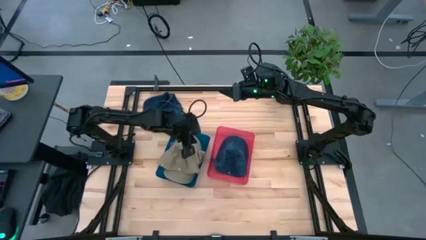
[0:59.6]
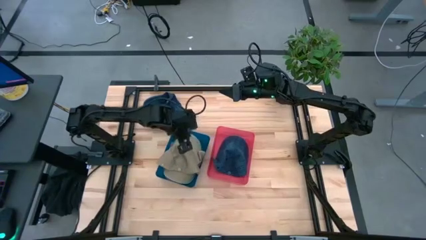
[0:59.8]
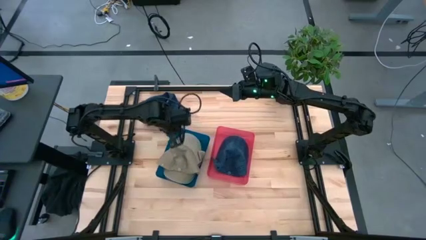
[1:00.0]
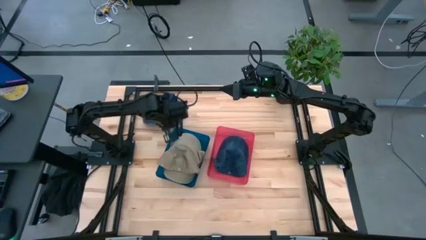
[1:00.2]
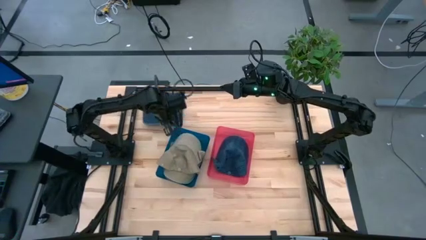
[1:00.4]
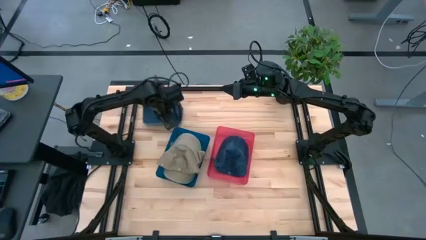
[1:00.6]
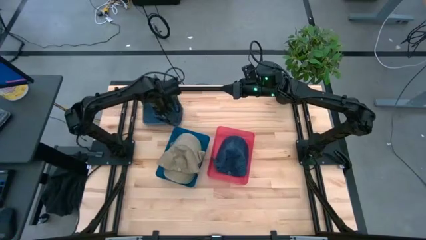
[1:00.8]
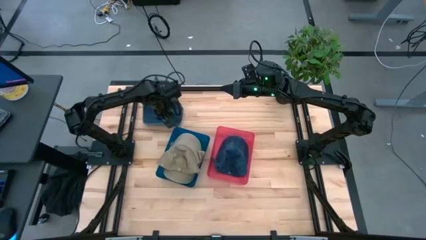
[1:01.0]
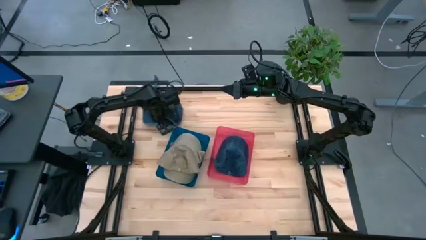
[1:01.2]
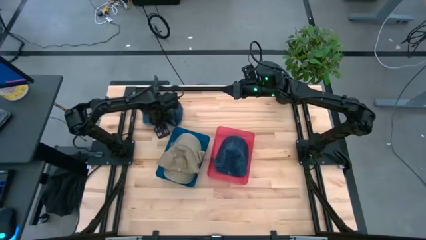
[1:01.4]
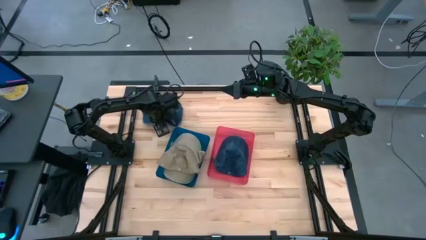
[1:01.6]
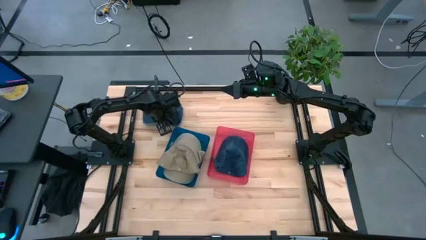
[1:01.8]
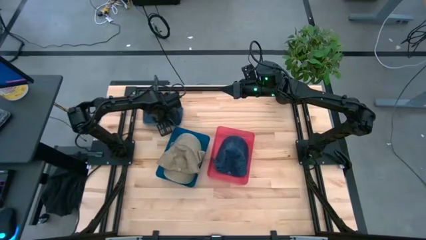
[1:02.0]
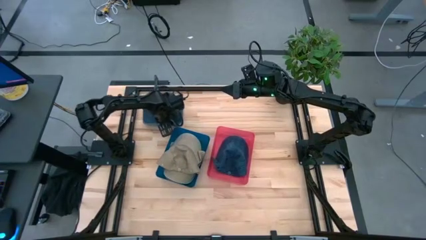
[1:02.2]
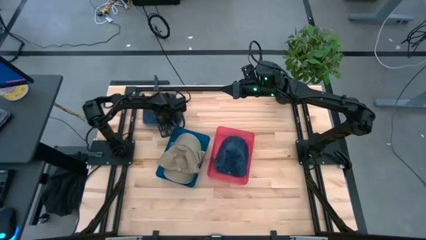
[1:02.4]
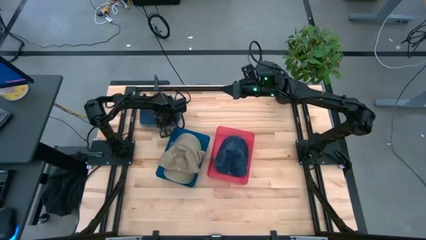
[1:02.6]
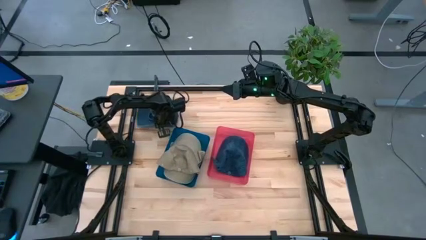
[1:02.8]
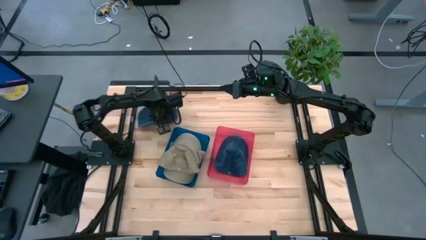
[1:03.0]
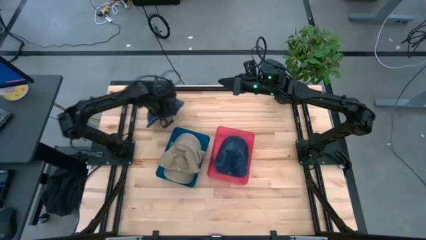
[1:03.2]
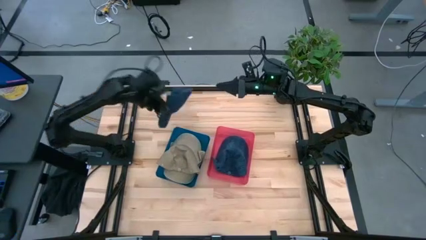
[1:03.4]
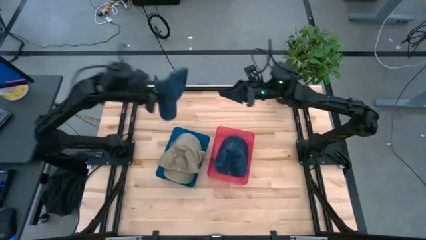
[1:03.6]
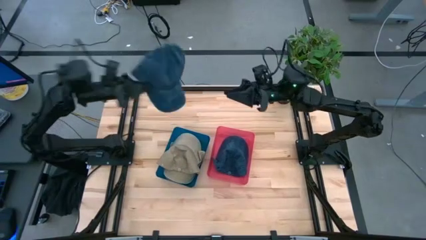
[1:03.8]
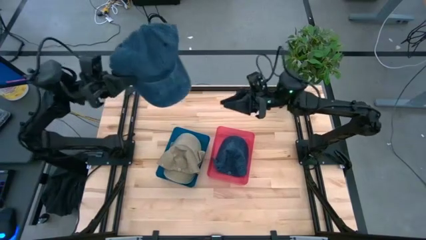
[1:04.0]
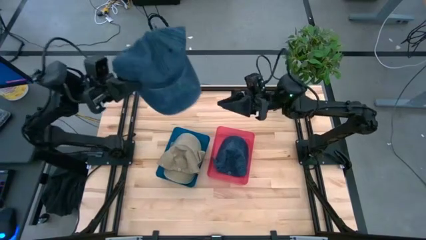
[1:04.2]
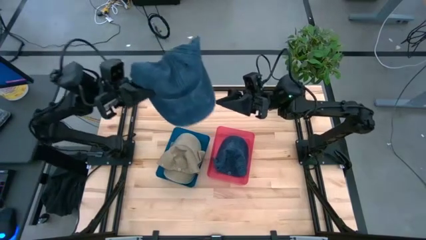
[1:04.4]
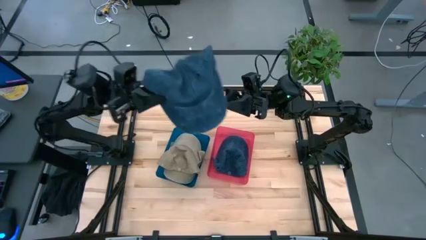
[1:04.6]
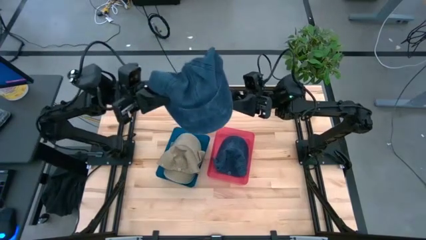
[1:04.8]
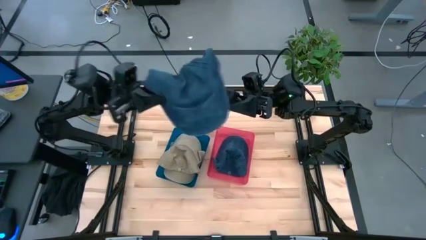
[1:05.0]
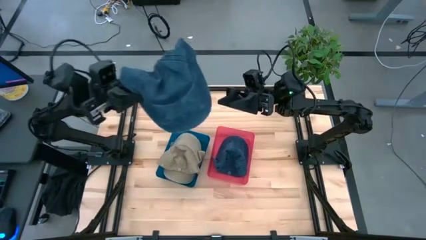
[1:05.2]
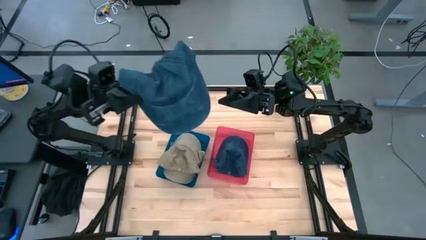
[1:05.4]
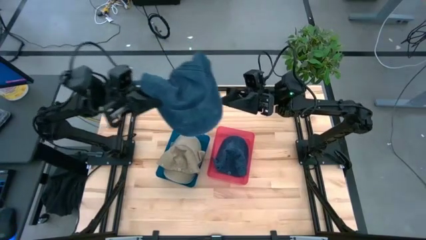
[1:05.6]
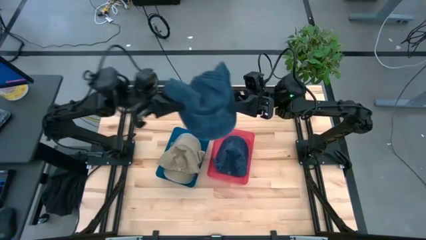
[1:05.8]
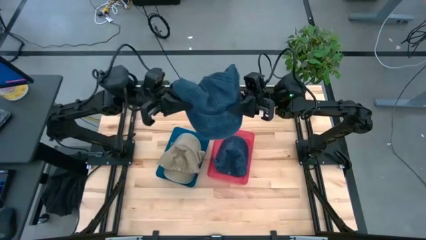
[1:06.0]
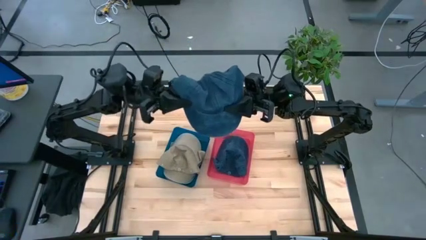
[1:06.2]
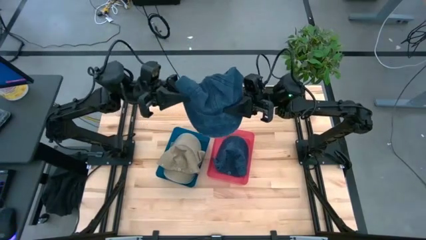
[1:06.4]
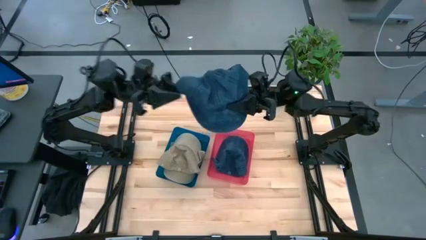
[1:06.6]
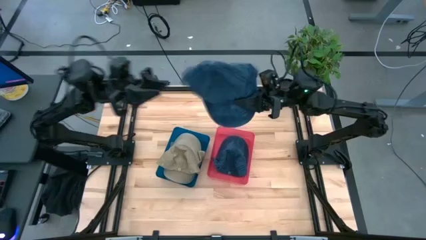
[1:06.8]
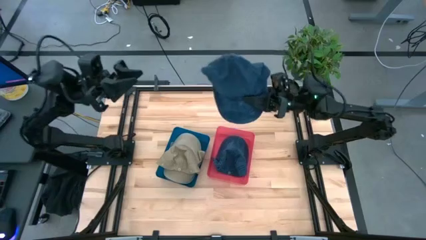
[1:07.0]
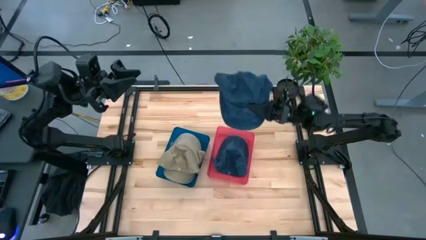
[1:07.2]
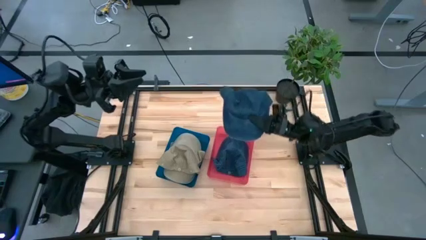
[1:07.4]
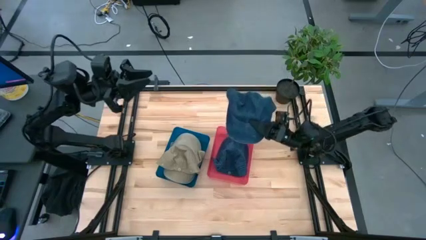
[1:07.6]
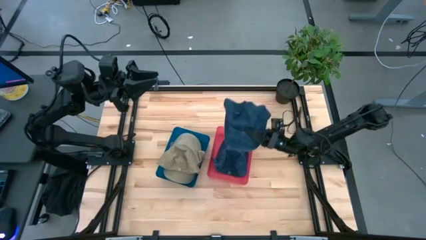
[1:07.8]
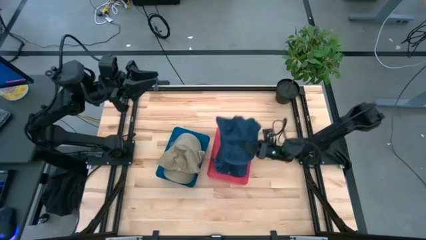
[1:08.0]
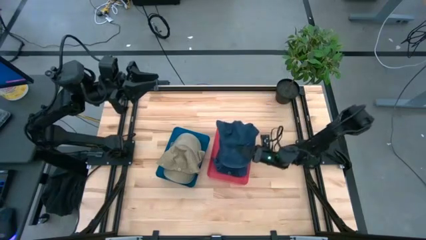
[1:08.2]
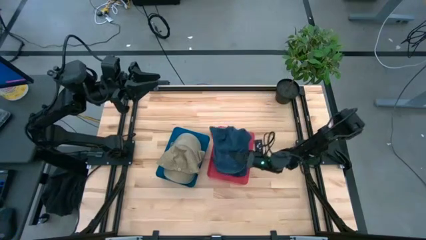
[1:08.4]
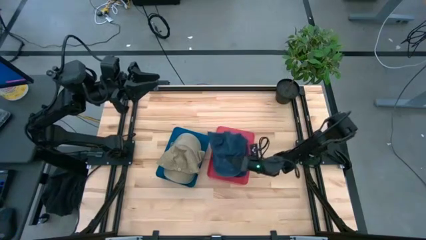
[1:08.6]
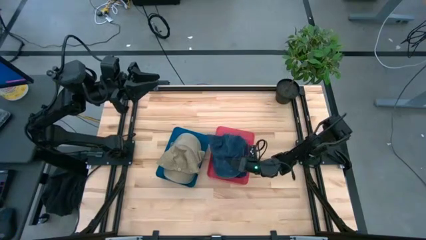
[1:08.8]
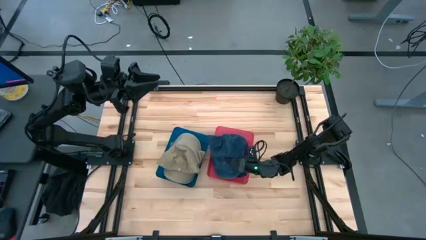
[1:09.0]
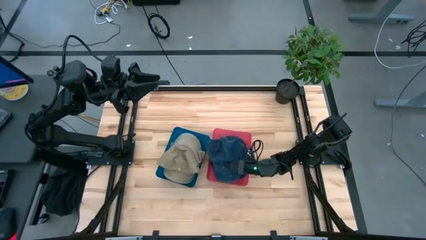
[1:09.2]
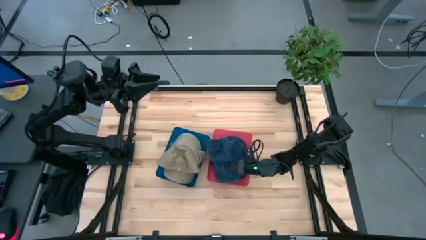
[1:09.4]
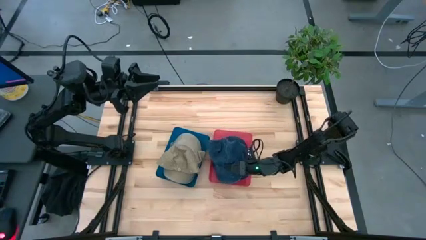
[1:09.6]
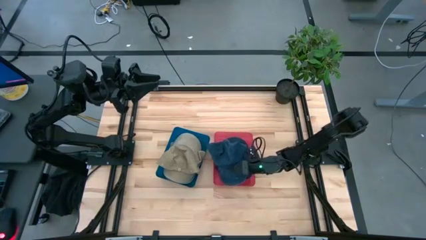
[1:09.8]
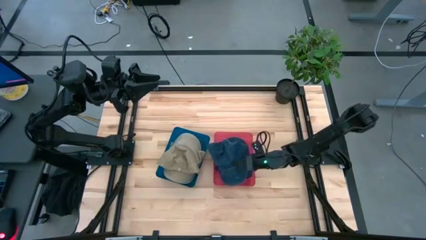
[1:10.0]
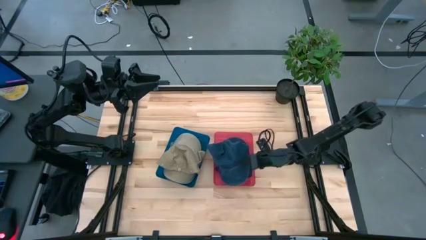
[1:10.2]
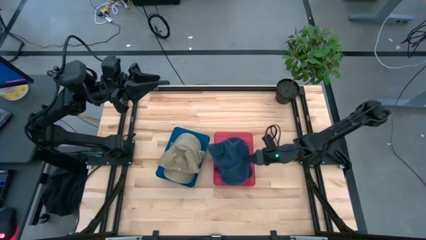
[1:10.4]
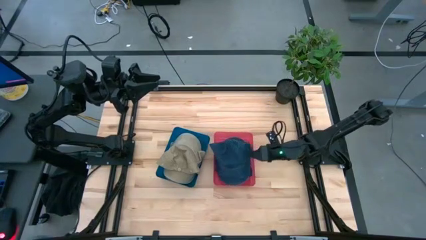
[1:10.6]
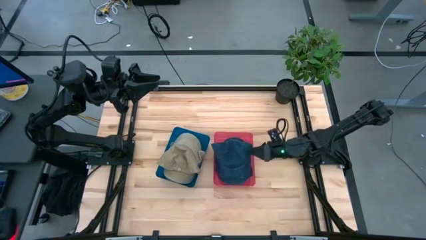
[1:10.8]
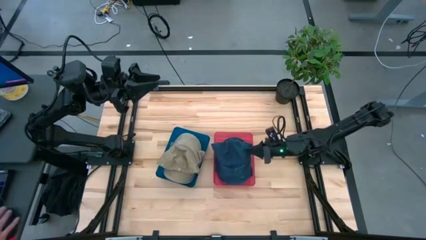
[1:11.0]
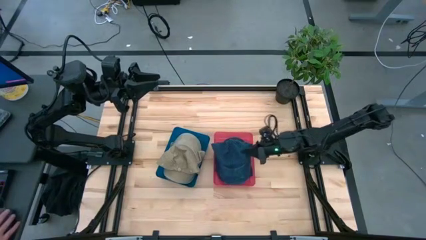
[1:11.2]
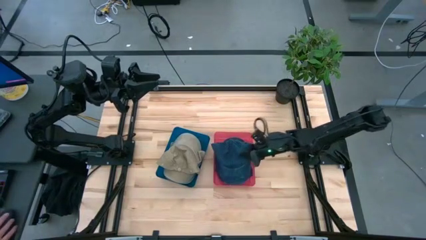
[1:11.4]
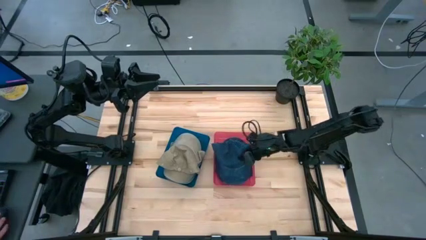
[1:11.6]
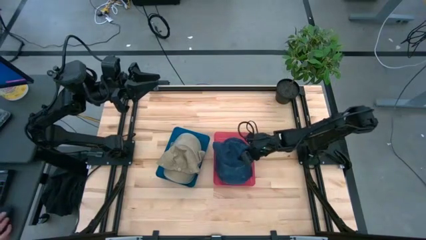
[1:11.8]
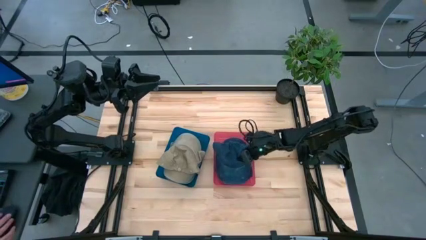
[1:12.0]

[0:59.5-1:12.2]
Task: Pick & Place hat
Put the blue cap into the red bin

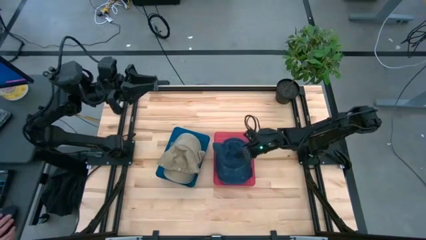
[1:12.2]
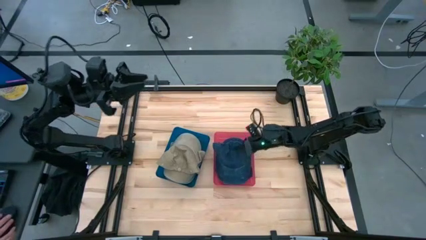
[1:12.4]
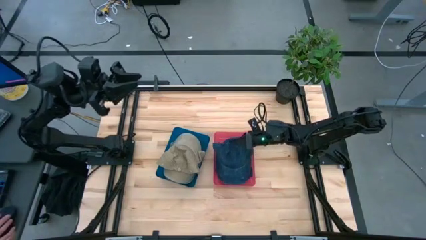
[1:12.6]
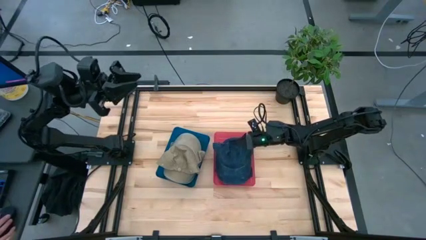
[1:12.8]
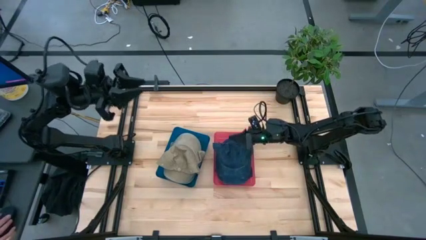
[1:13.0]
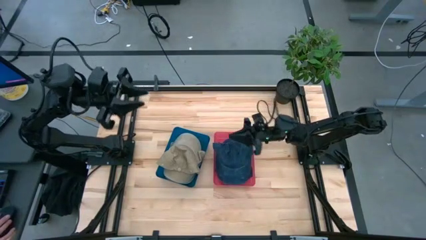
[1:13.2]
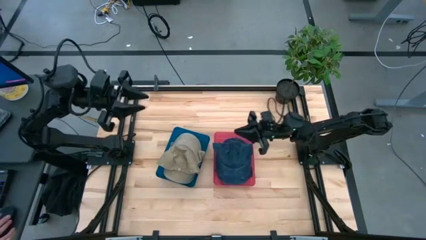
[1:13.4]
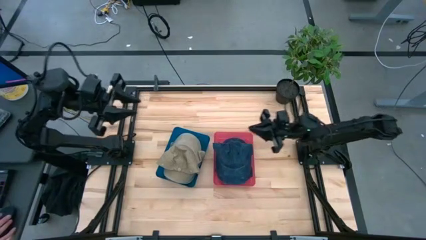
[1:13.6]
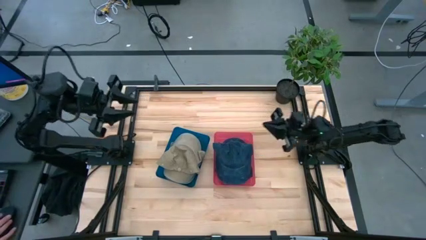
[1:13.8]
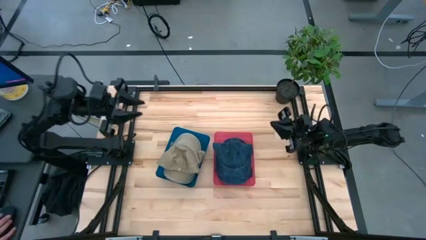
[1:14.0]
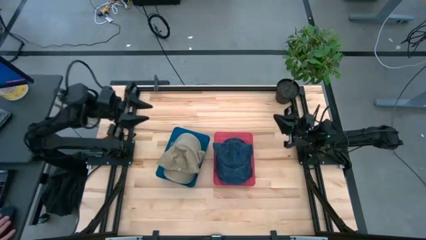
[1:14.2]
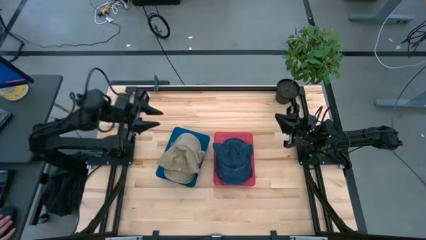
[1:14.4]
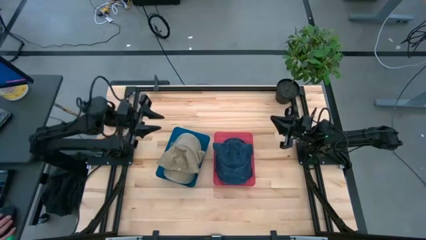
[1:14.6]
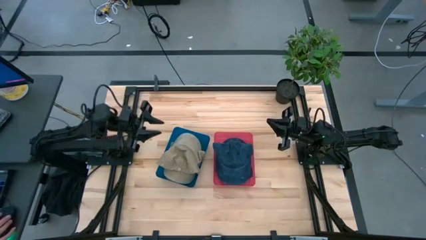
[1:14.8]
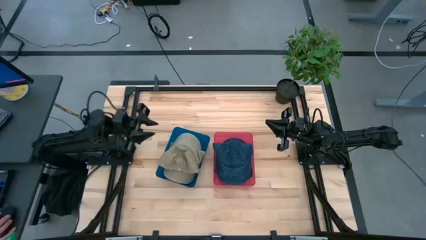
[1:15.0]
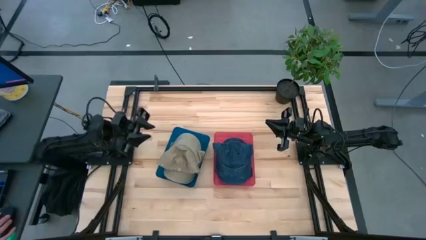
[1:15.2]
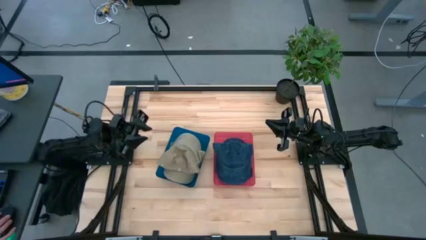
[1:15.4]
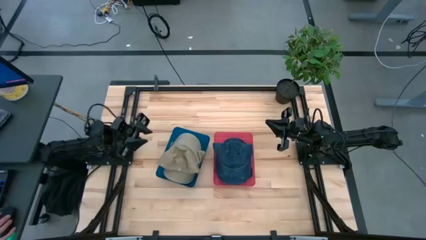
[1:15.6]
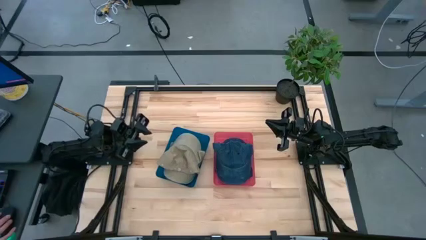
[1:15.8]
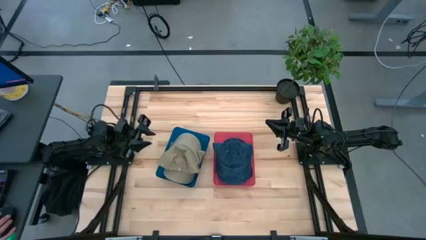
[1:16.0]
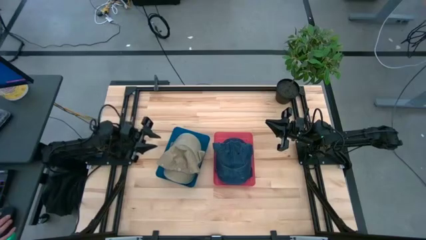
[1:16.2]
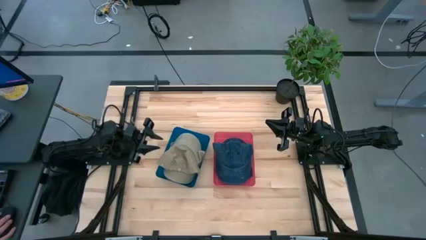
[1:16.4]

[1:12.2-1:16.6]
Return to Home Position
